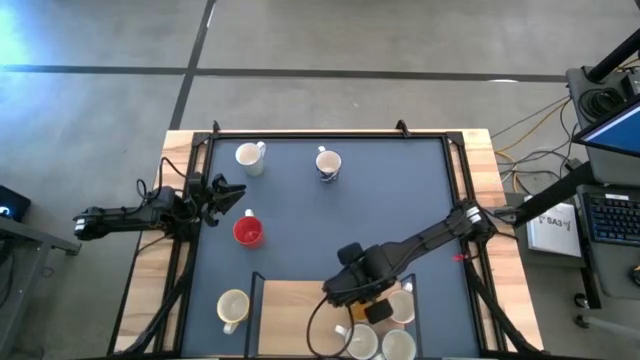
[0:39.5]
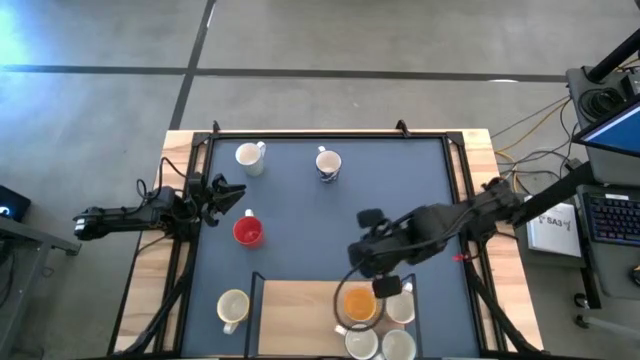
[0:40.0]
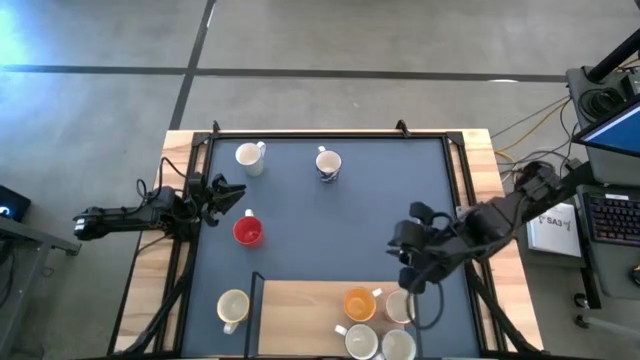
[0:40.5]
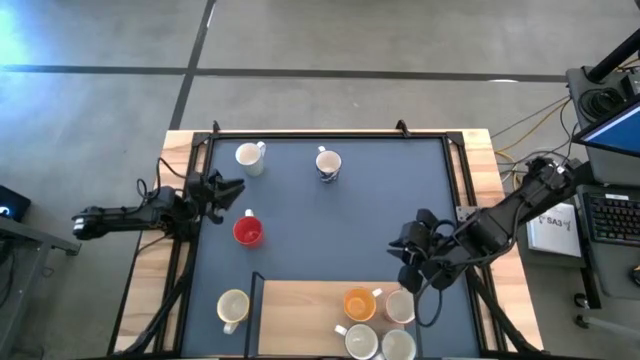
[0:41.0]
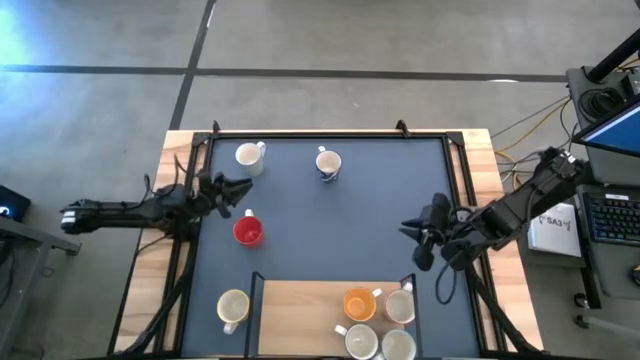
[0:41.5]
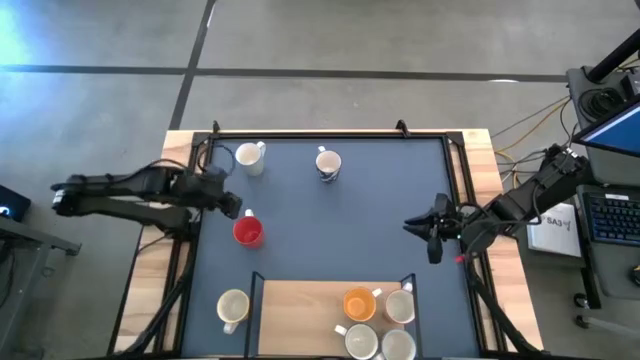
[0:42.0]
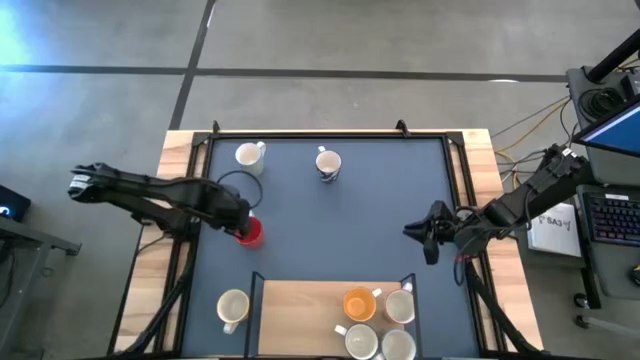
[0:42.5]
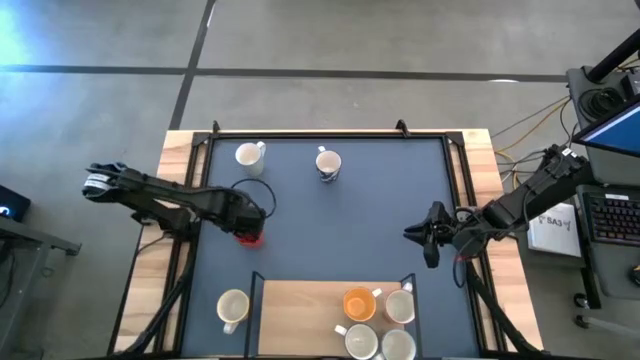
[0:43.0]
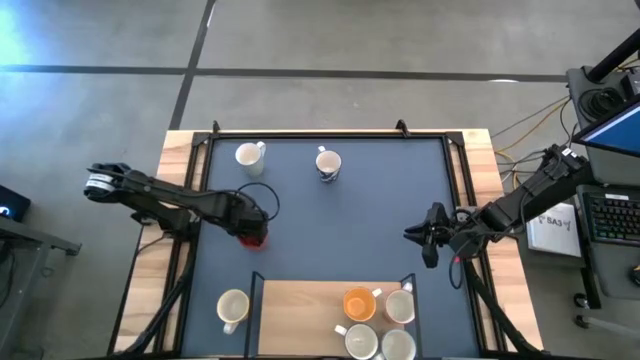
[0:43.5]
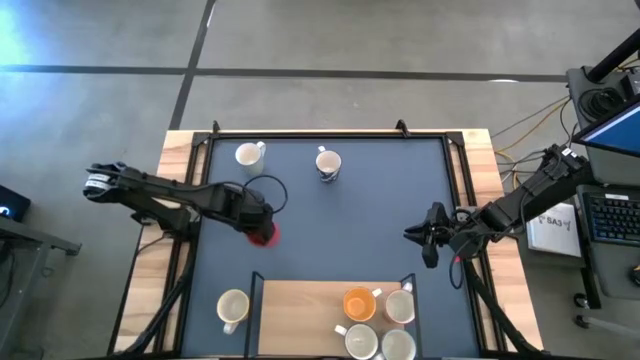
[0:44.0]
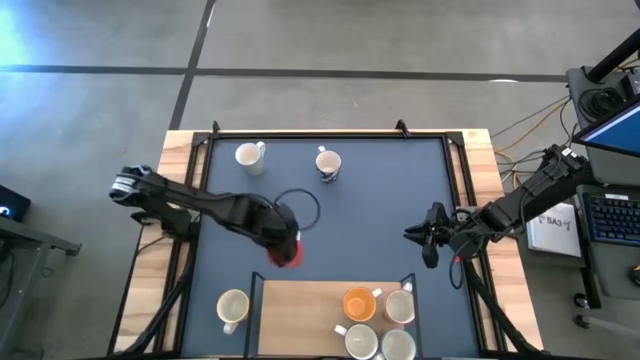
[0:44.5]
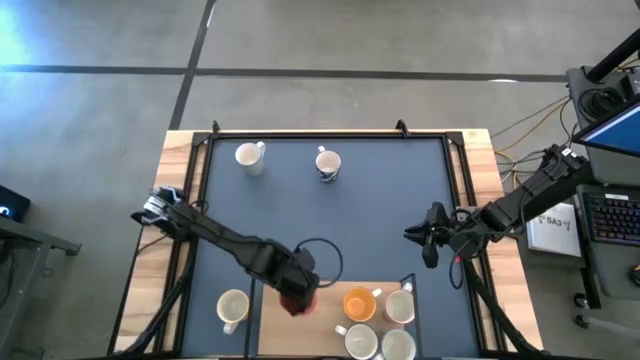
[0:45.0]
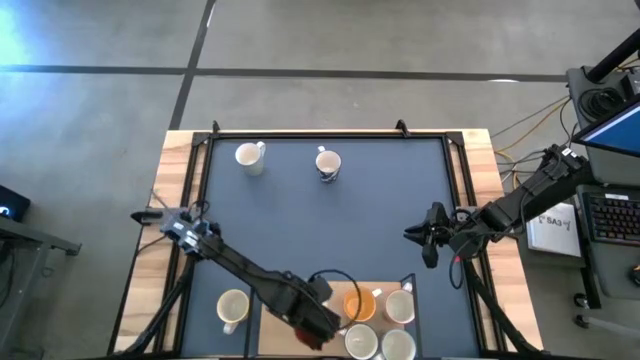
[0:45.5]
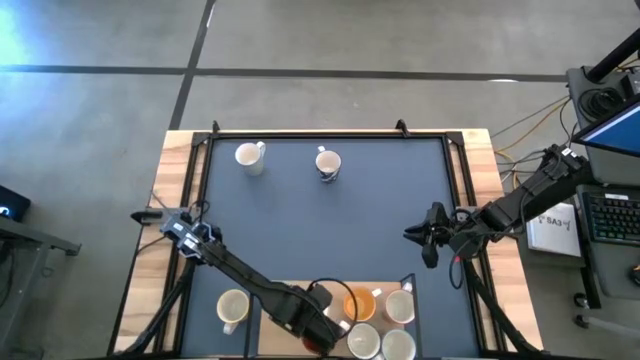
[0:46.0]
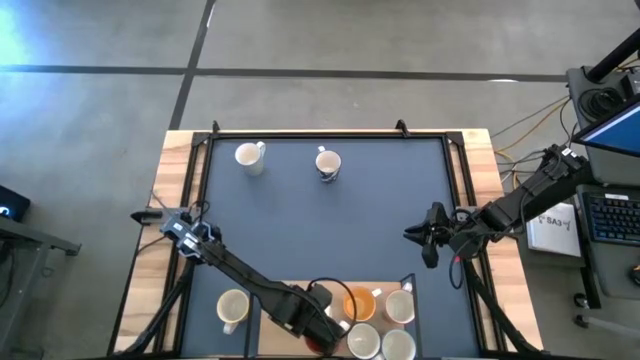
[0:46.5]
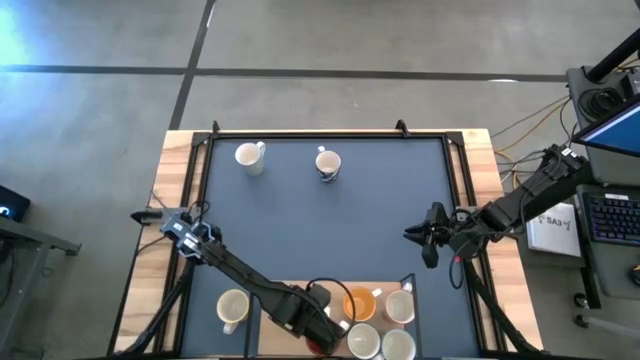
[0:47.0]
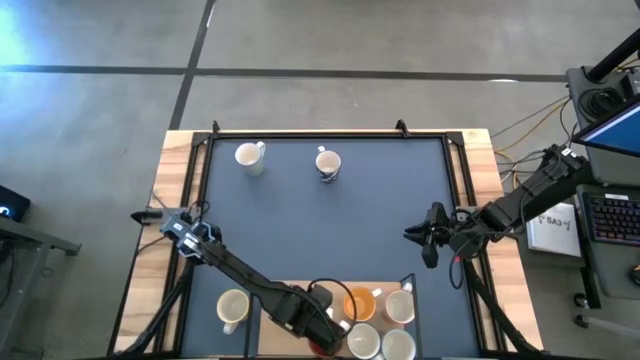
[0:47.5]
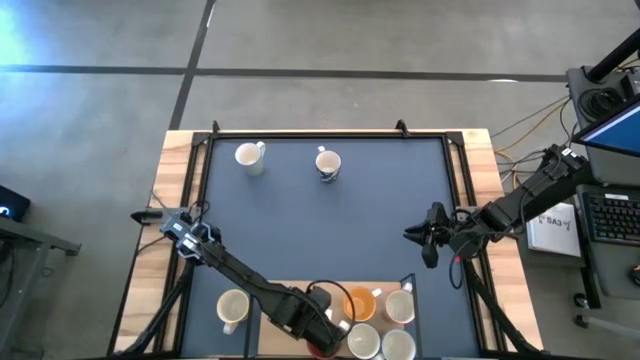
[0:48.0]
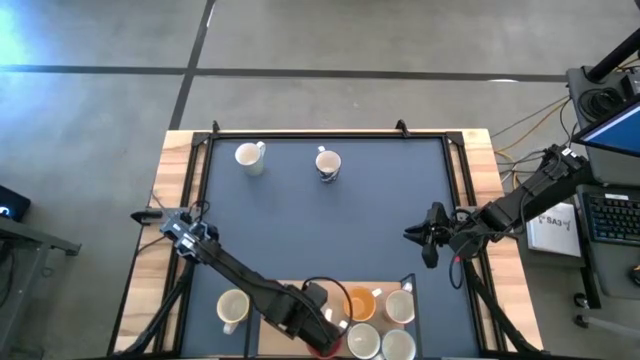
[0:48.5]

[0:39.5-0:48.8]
Task: Place coffee mugs
Put the red mug on the shelf

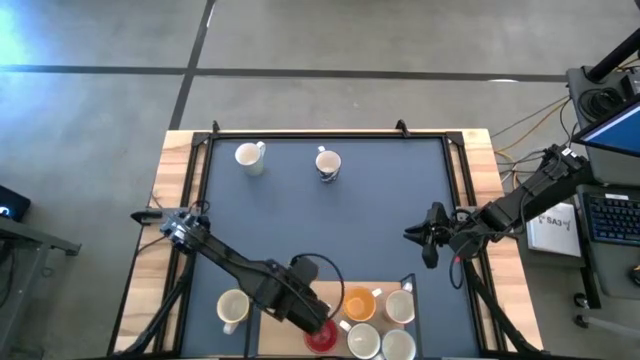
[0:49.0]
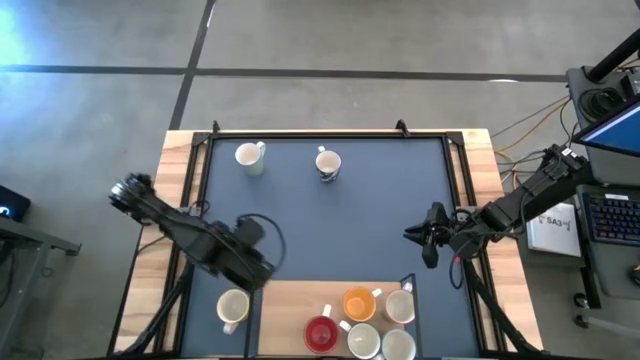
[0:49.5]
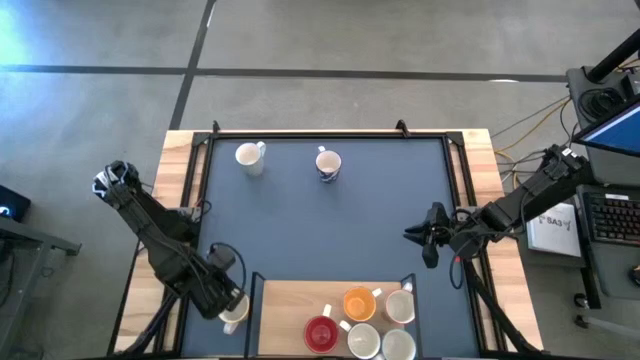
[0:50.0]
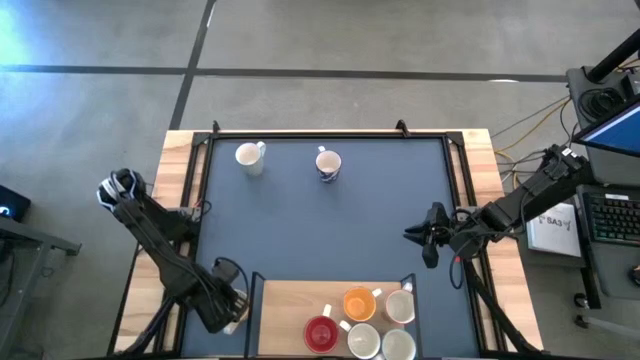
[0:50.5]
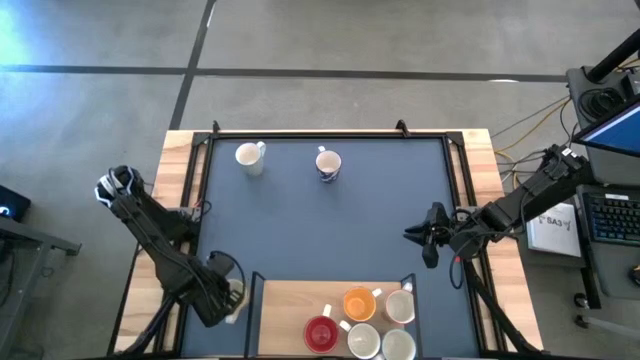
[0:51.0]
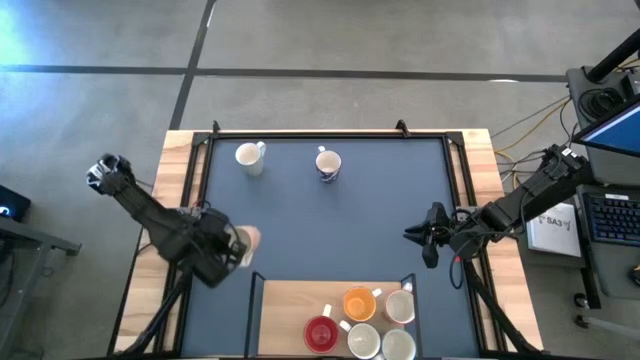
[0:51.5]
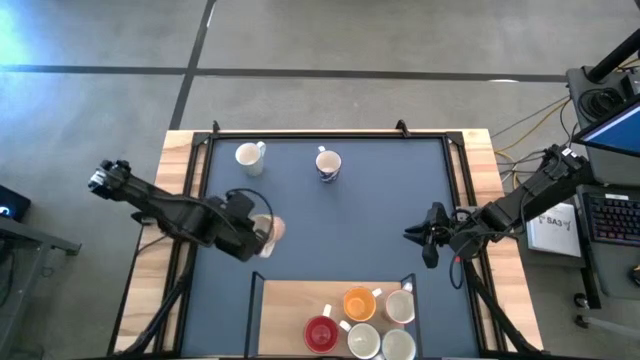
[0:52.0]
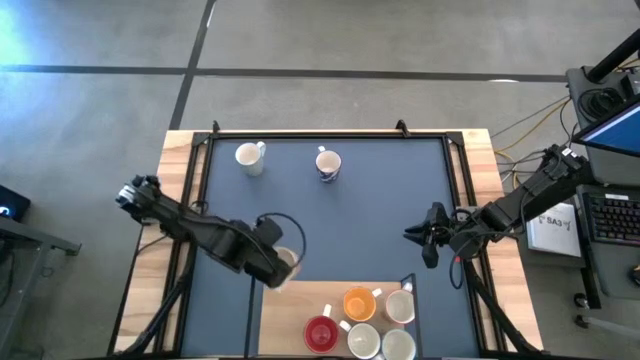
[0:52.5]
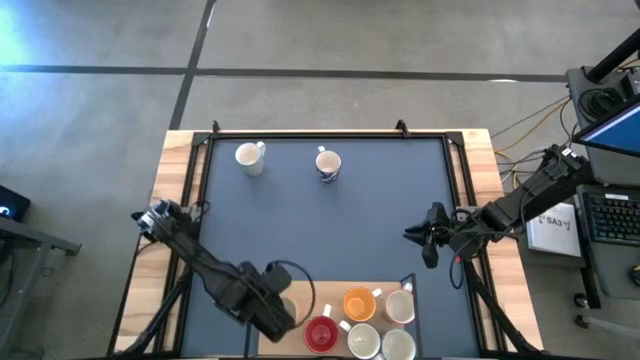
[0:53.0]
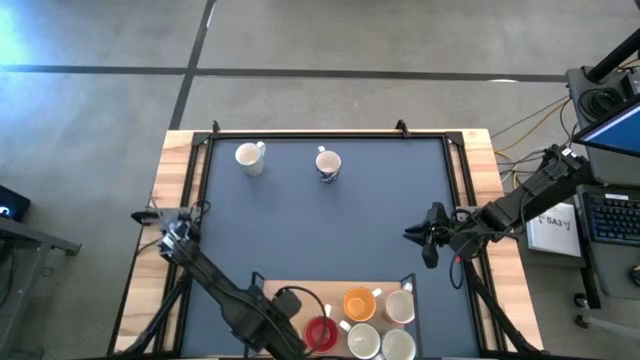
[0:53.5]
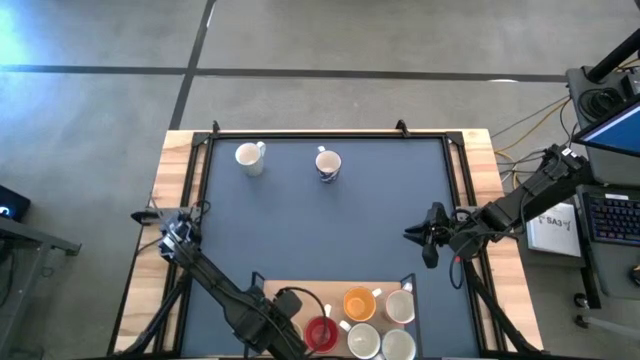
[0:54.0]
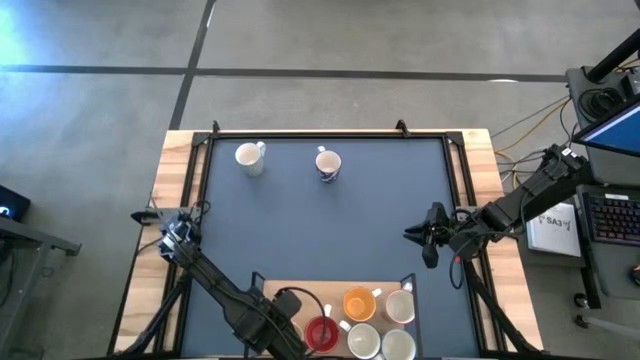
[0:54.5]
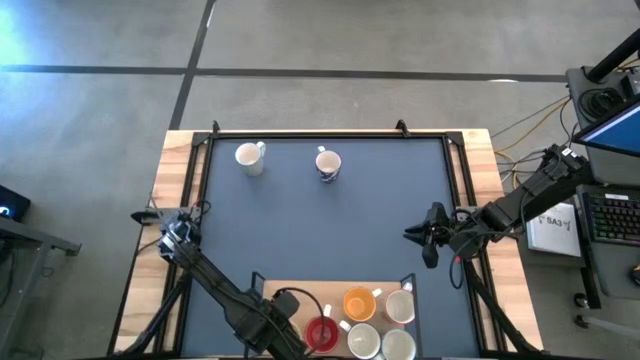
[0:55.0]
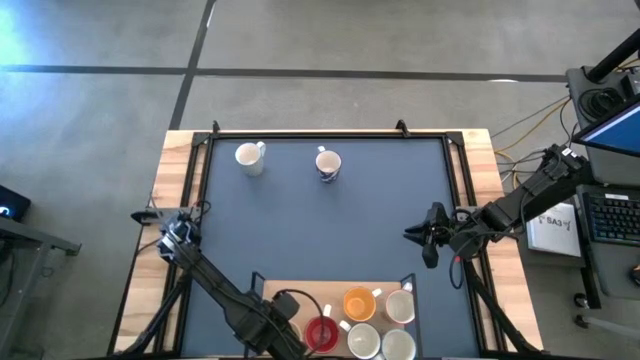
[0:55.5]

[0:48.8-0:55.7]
Put the orange patterned mug on the shelf

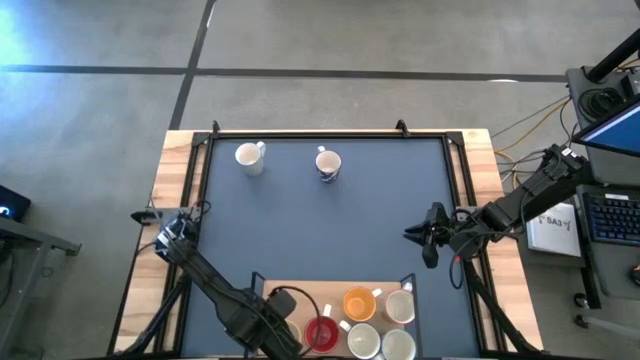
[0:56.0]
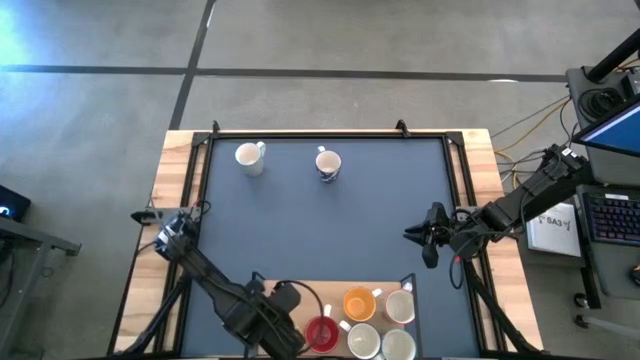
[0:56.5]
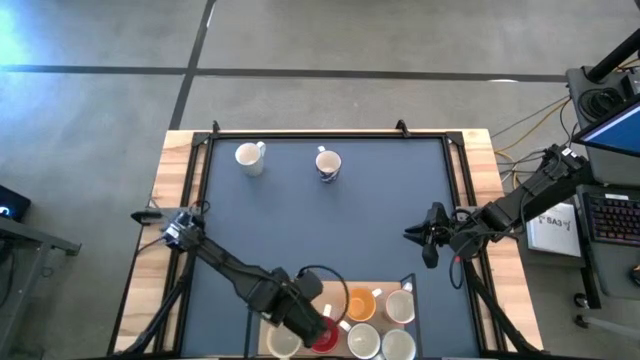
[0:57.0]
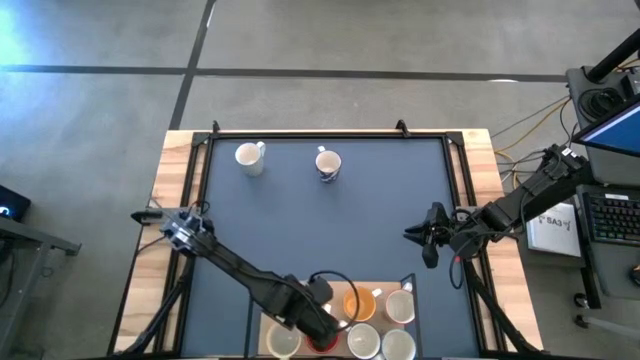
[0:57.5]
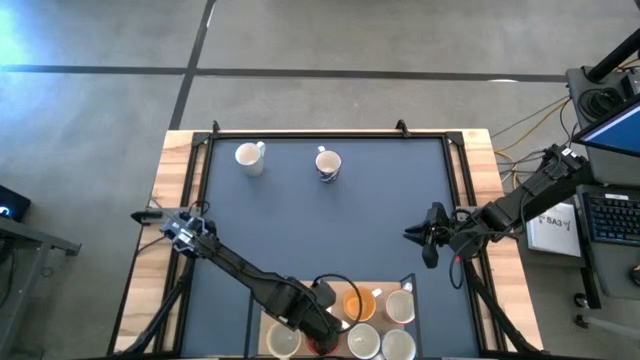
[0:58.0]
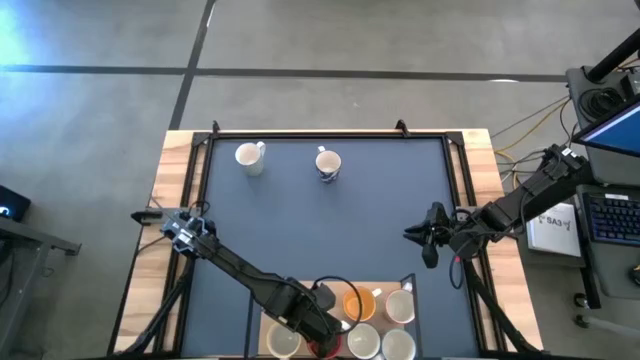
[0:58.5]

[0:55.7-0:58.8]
Adjust the red mug on the shelf

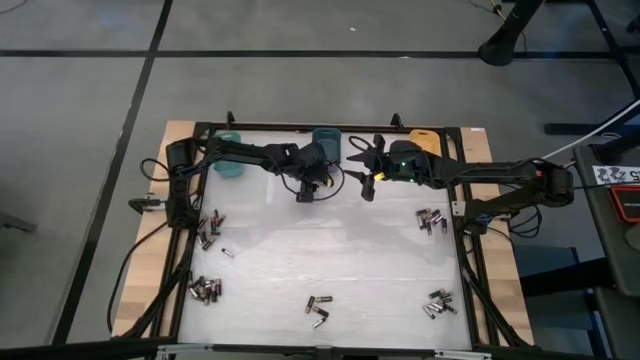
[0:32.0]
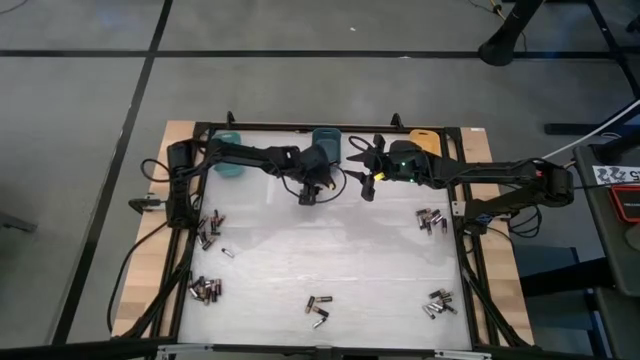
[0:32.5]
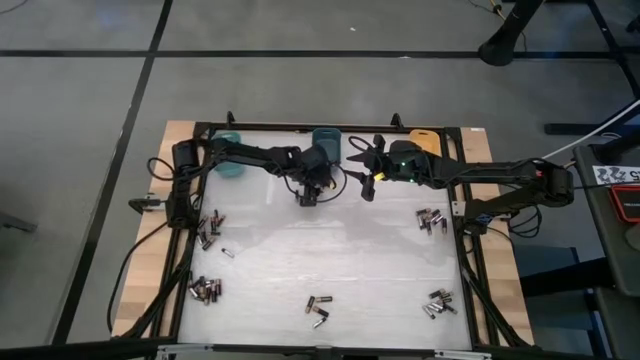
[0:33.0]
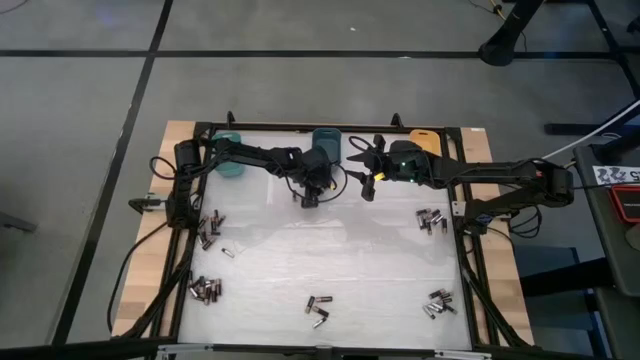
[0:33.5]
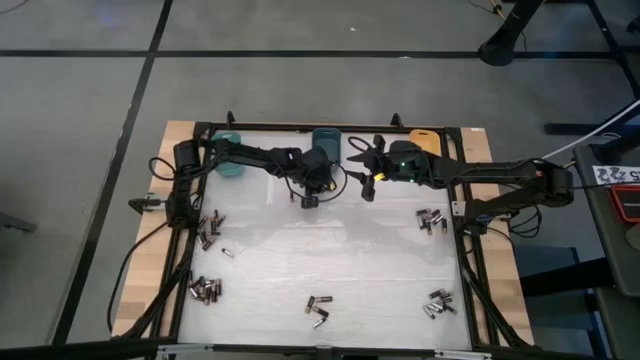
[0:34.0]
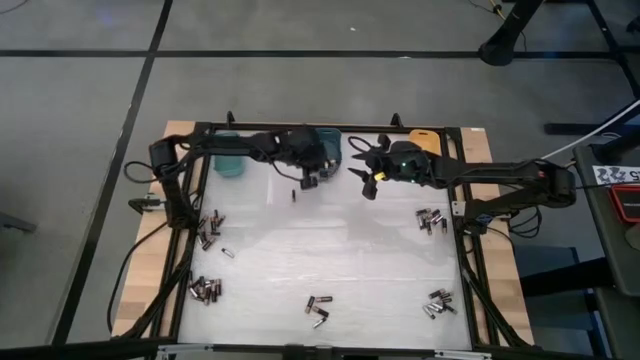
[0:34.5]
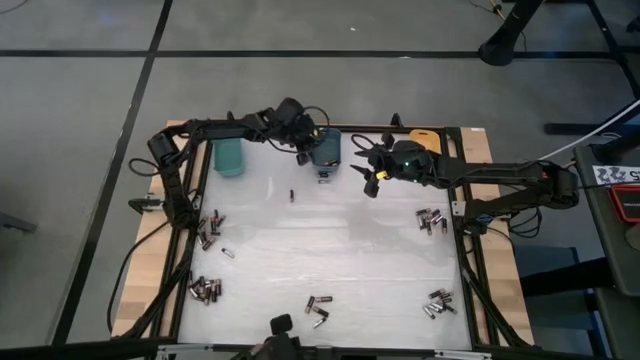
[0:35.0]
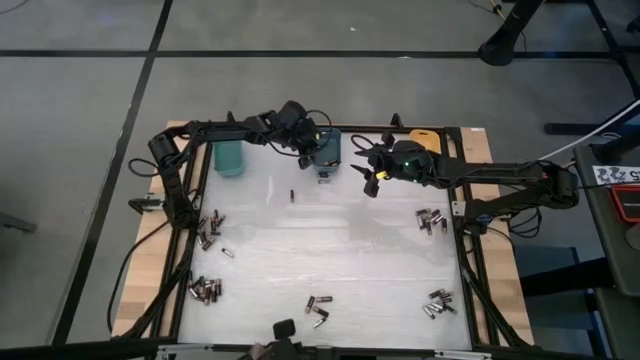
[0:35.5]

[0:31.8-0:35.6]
Task: Sort batteries
Move the brown battery from the top center to the dark blue bin
